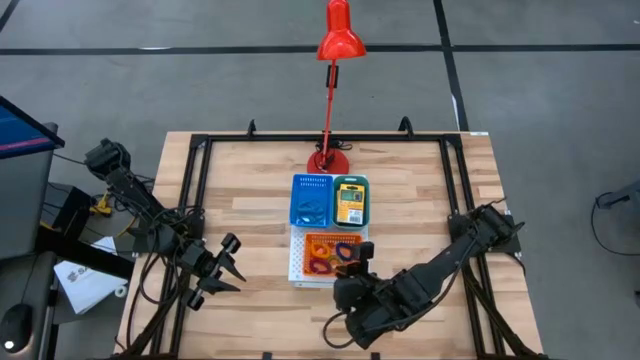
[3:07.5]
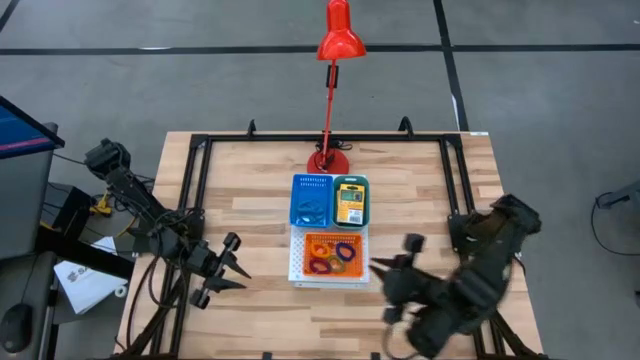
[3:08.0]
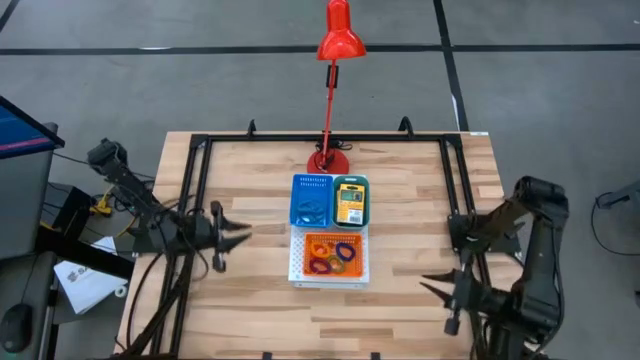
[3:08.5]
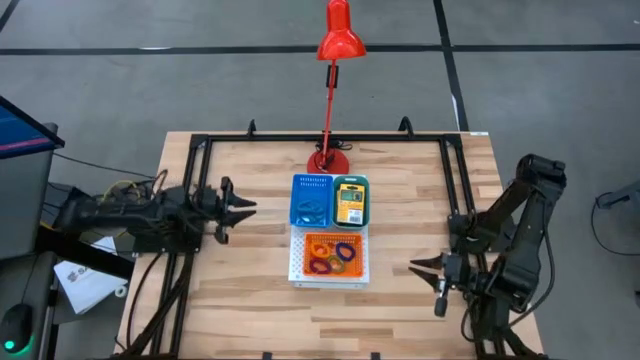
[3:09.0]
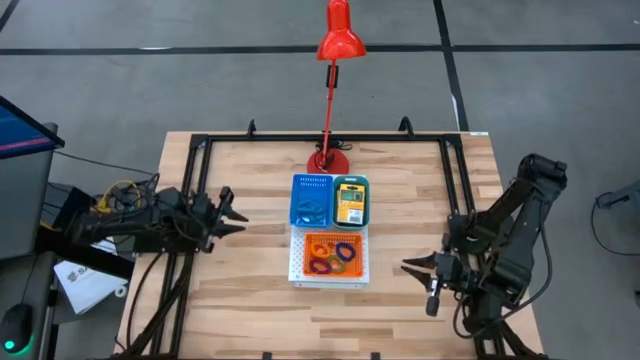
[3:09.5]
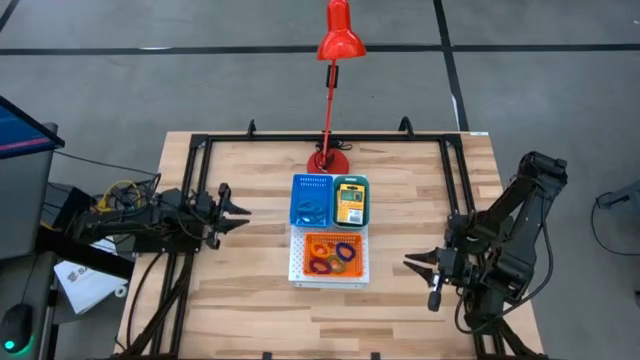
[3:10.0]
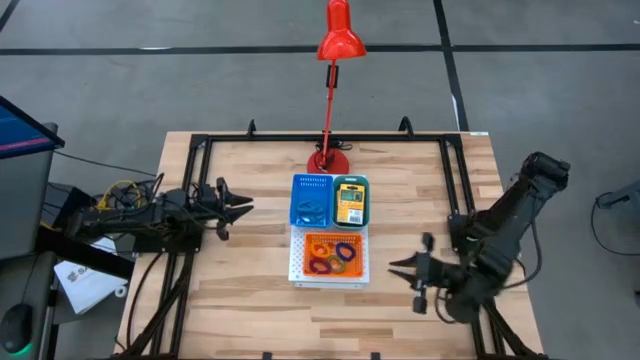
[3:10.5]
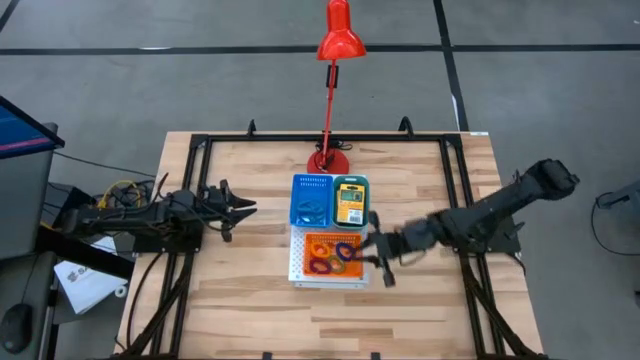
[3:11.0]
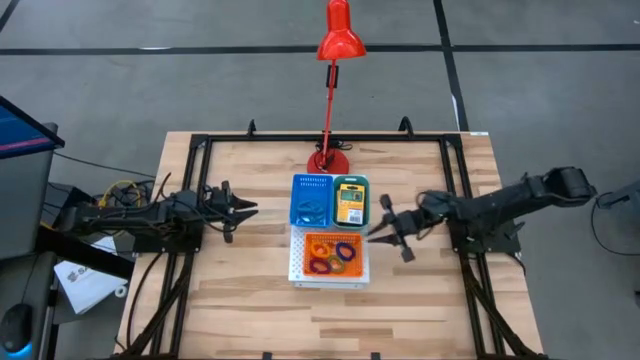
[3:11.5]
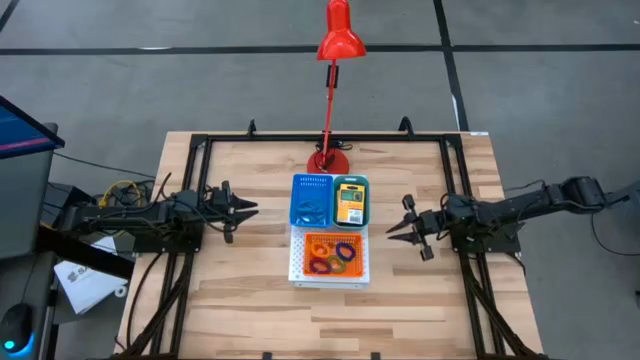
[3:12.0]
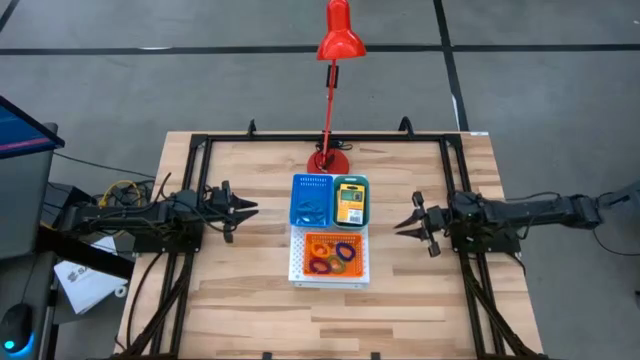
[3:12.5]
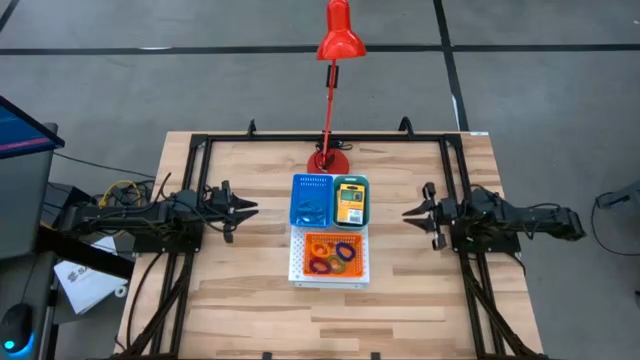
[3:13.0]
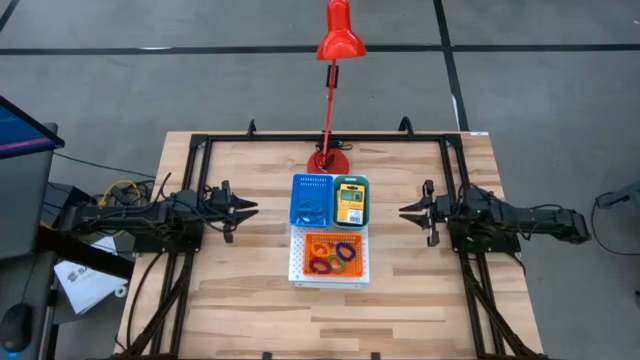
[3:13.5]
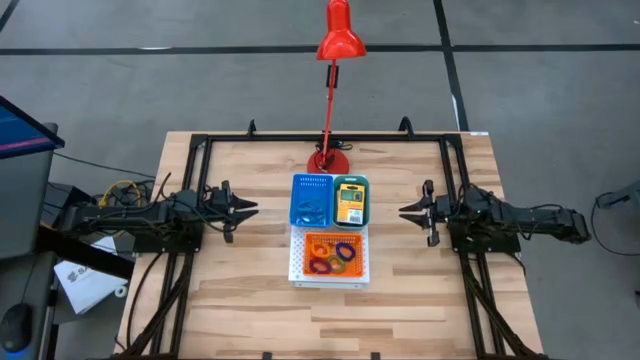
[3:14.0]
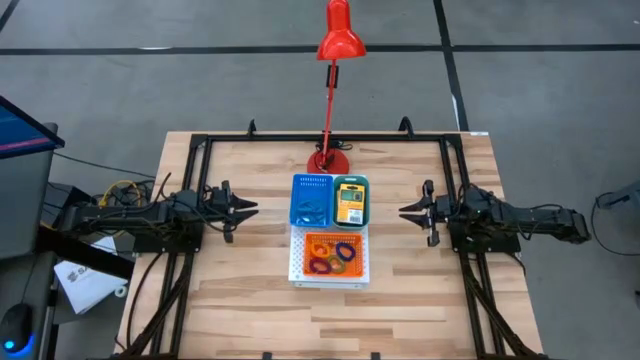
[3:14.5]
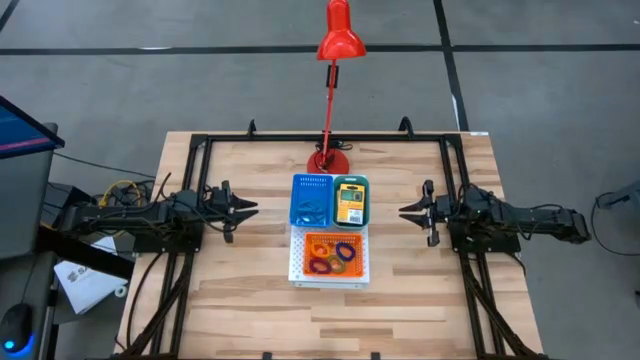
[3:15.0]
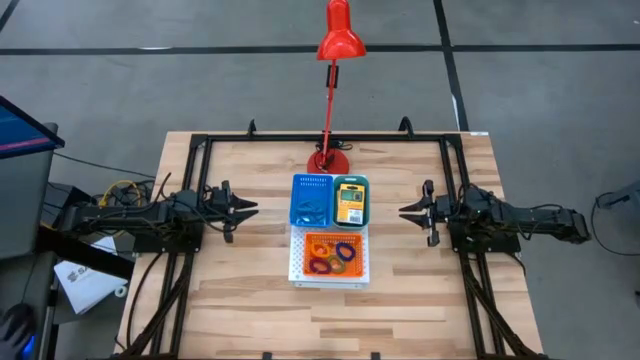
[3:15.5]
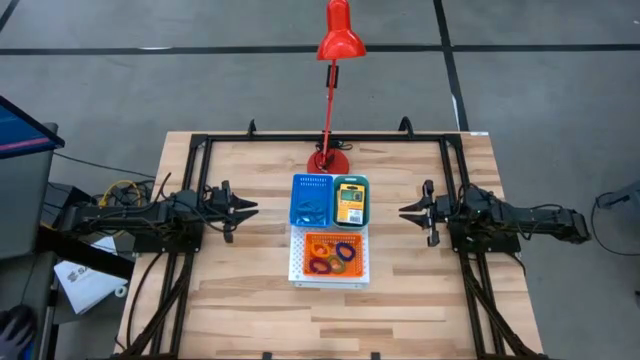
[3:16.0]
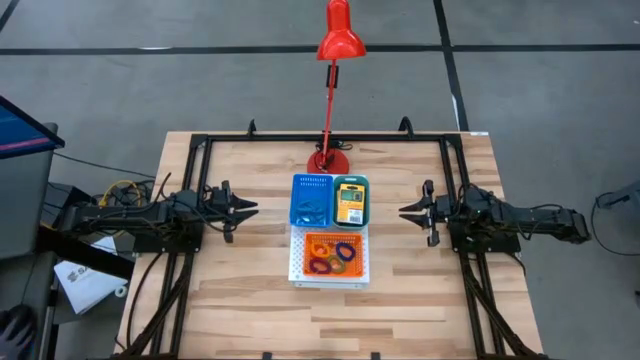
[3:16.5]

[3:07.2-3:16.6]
Task: Pick & Place Office Desk Supplies
Return to Home Position

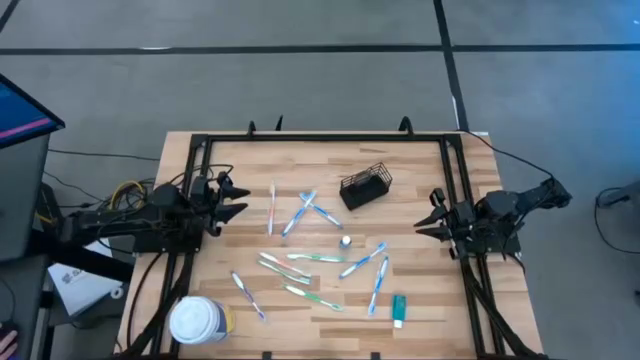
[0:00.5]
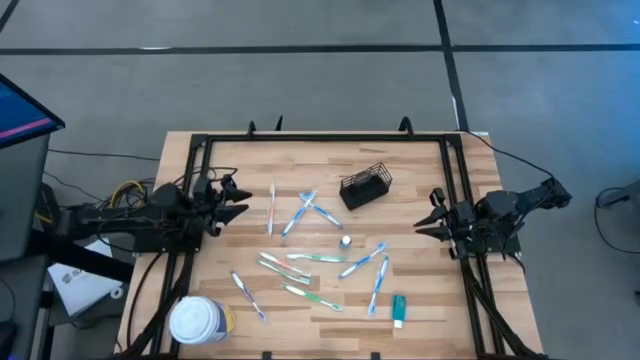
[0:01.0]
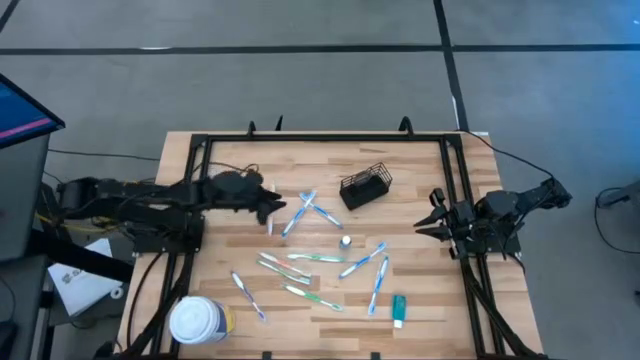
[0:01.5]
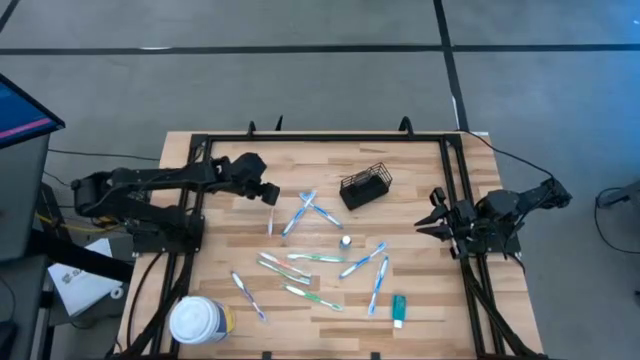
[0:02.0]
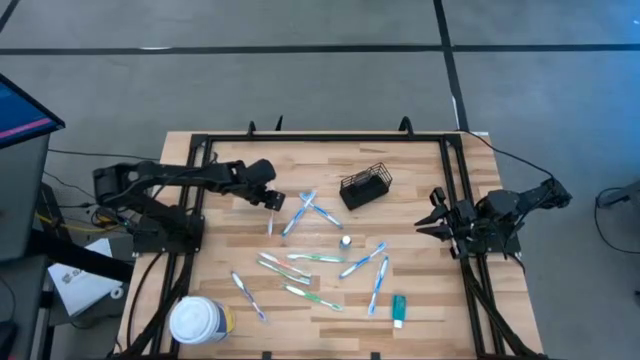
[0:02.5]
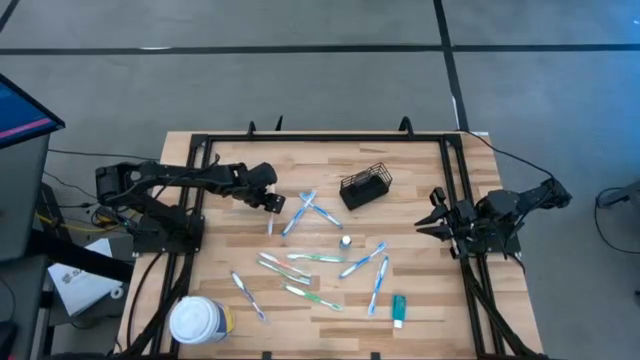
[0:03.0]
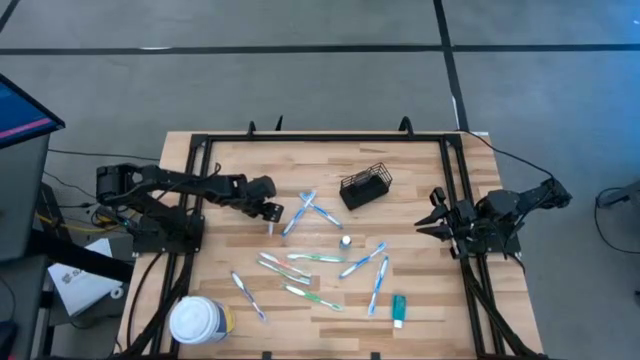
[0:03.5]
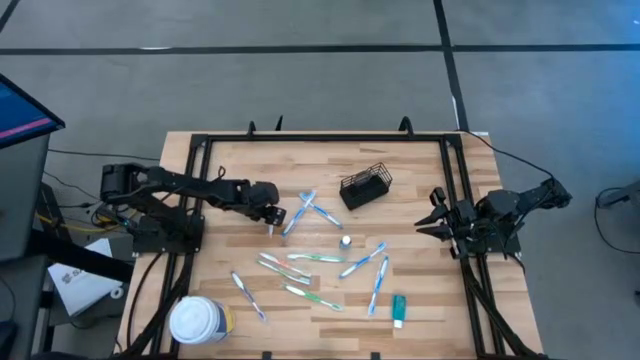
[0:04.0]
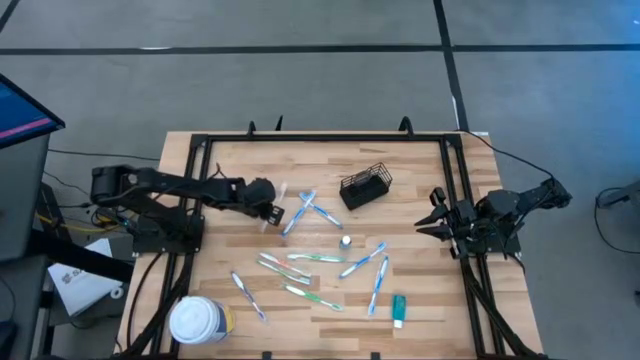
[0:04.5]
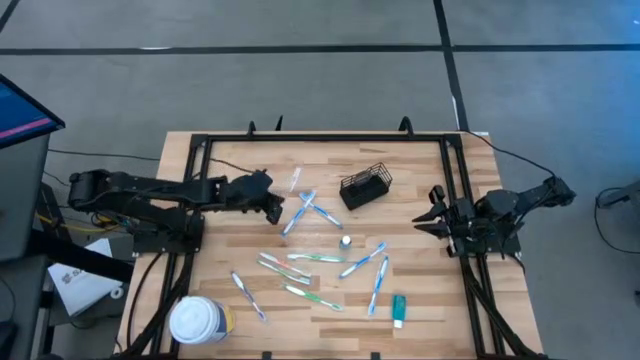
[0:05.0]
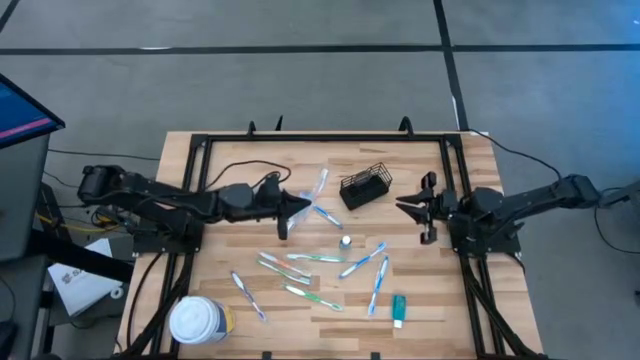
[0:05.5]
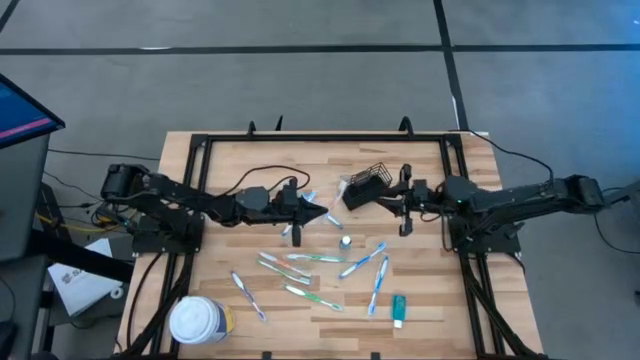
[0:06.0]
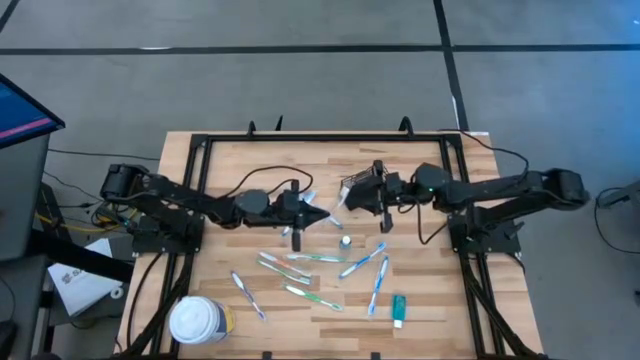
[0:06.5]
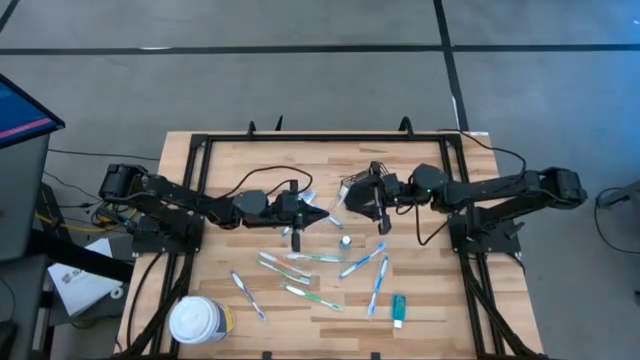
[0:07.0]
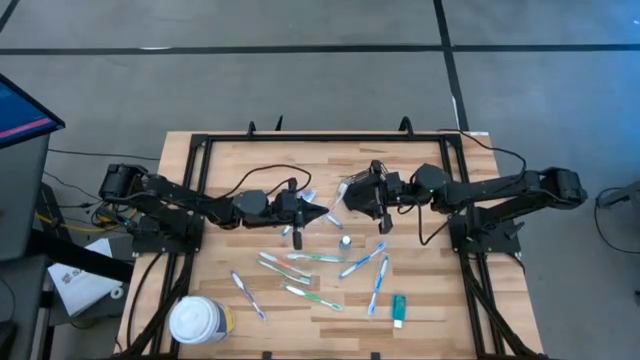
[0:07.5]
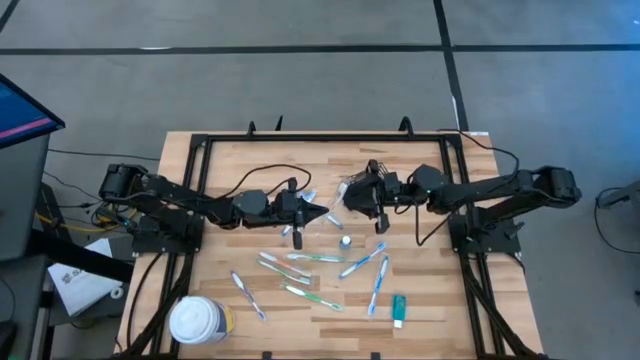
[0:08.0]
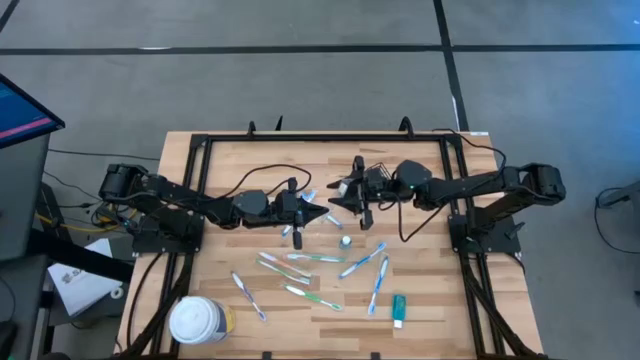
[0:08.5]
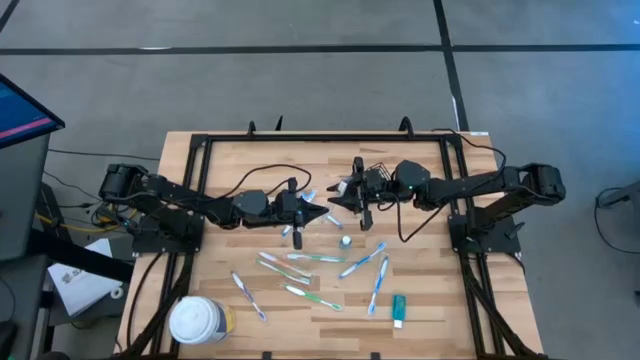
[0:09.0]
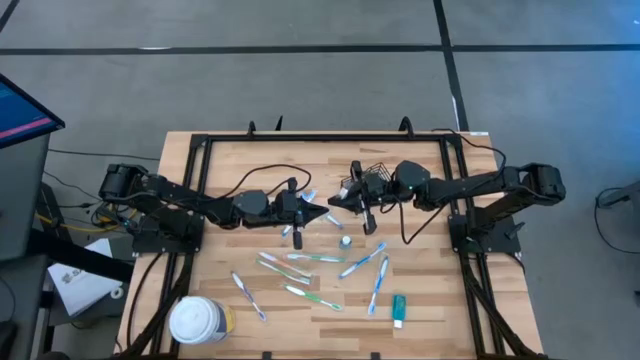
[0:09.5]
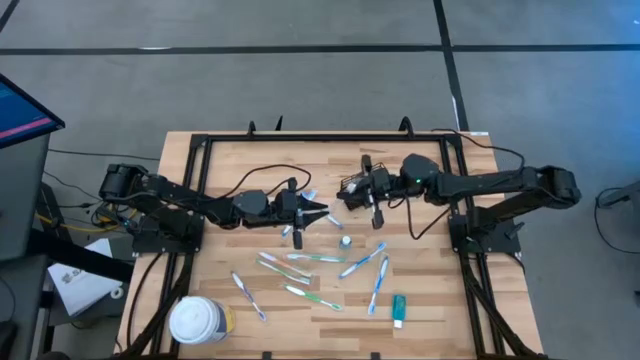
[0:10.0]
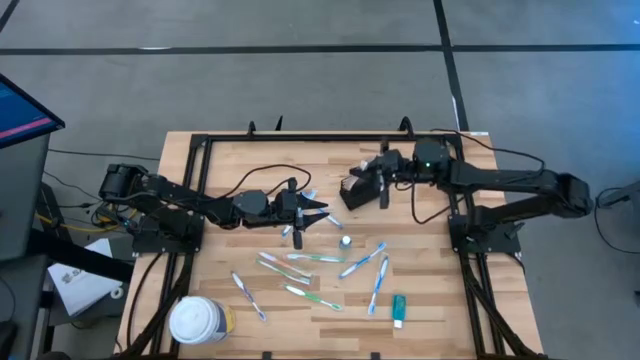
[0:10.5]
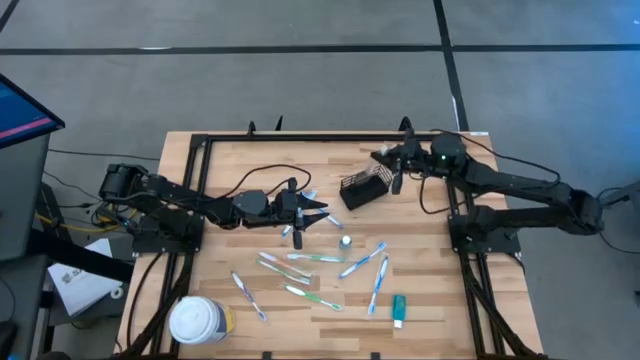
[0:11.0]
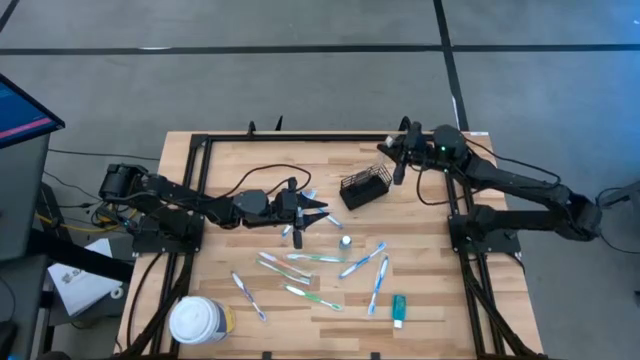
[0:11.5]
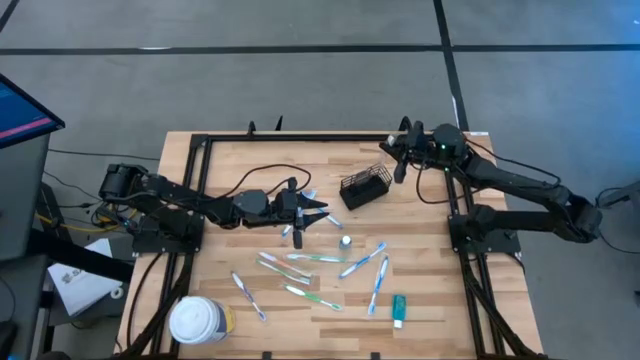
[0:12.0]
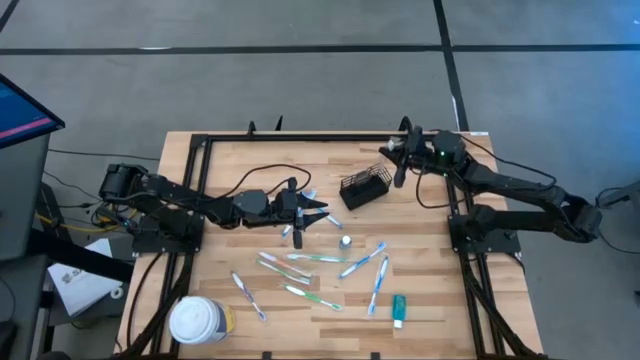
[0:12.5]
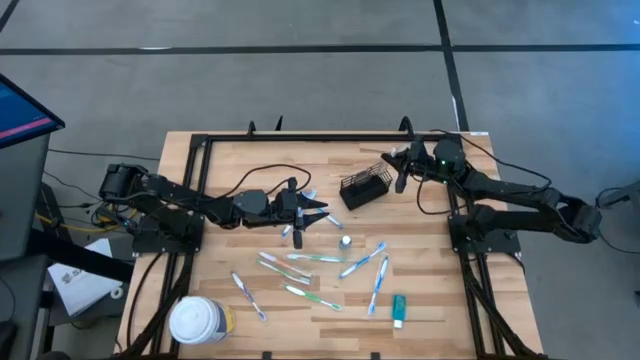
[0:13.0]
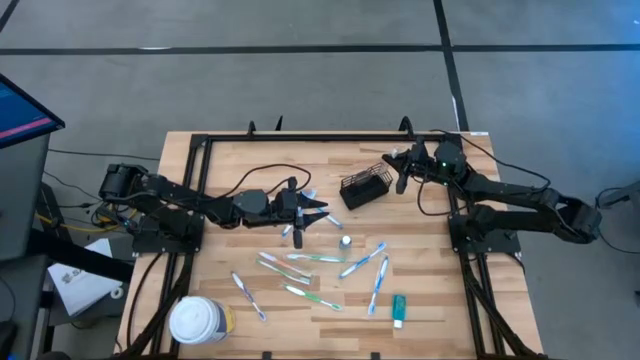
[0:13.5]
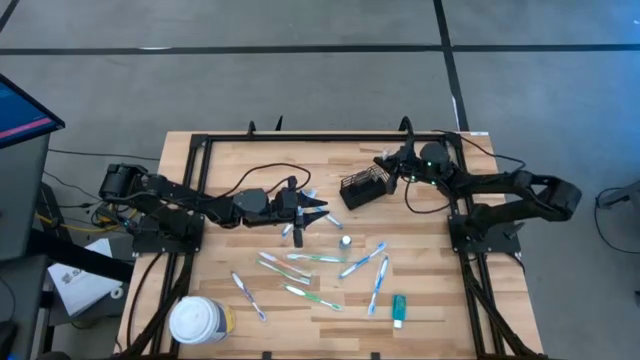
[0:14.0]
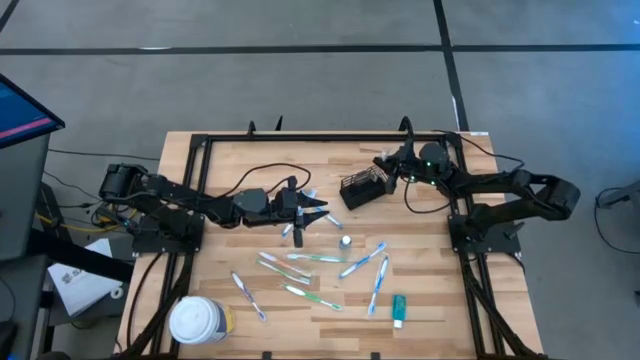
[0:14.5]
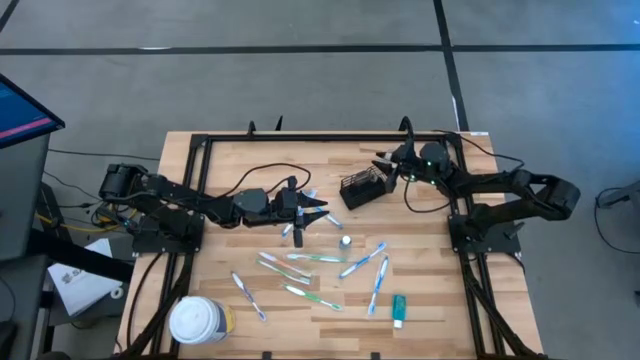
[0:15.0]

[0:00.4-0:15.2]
Task: Pick & Place toothbrushing station
Put the orange toothbrush into the mesh organizer
